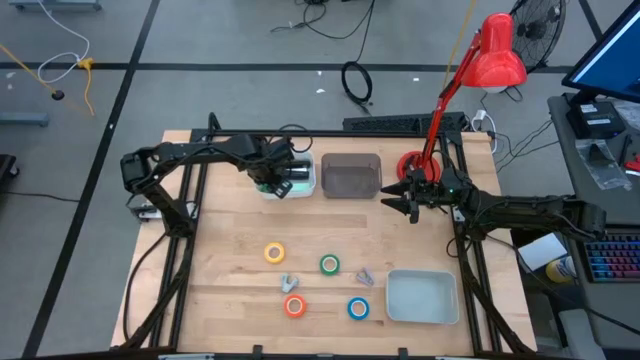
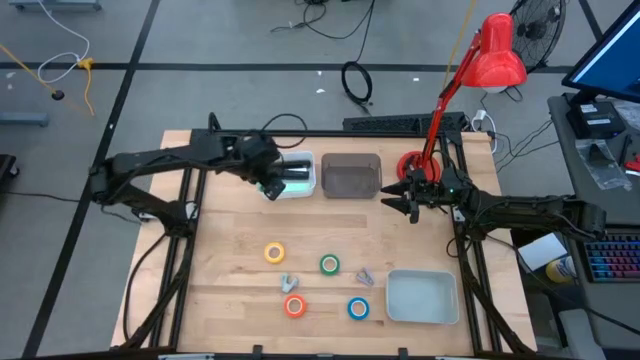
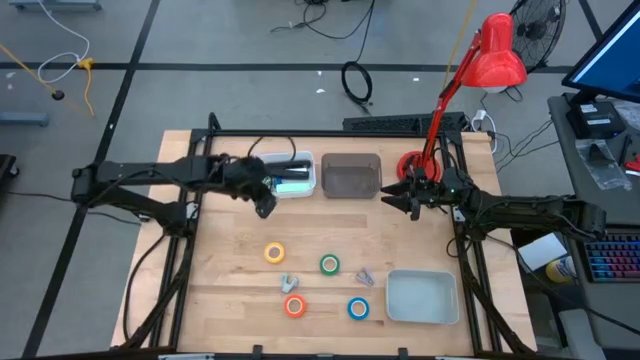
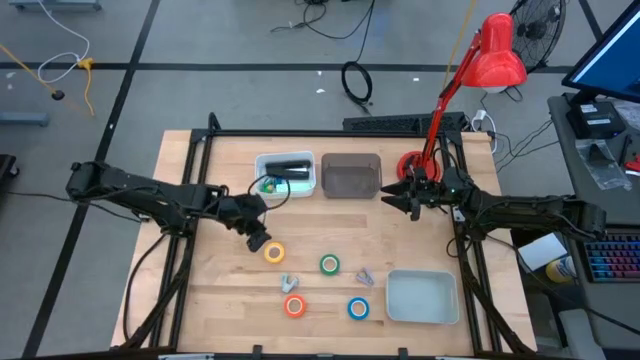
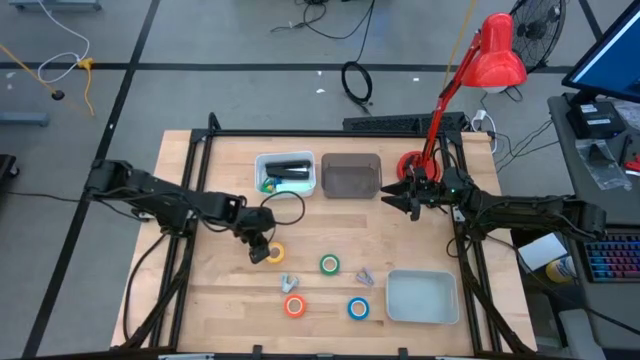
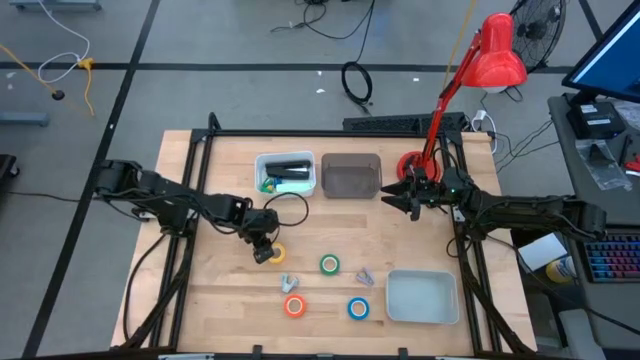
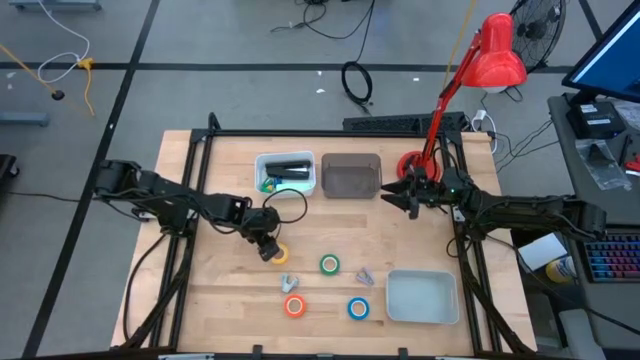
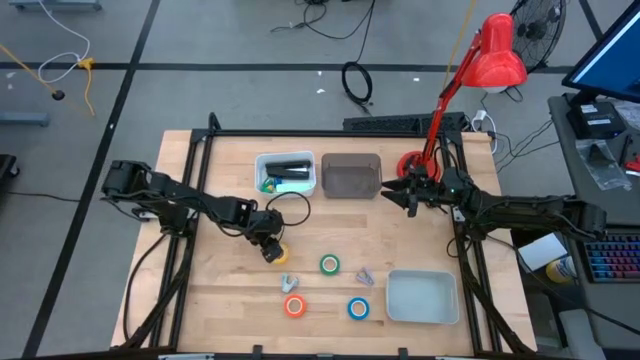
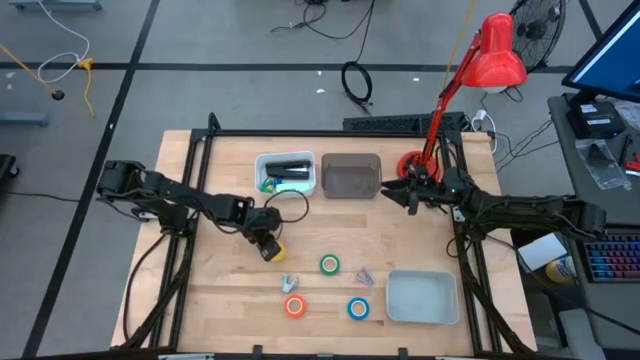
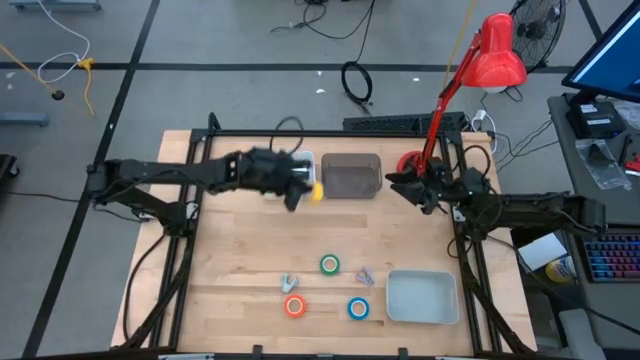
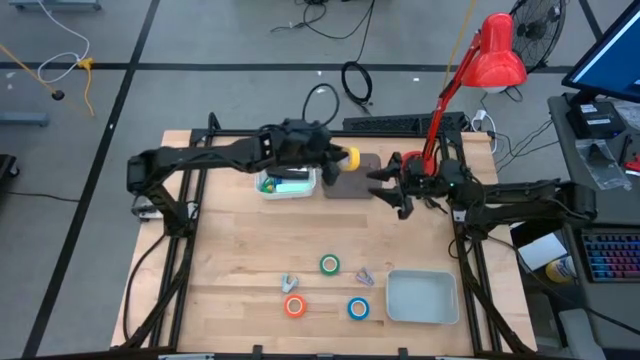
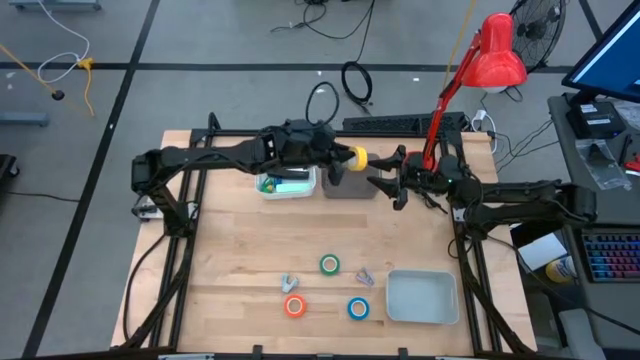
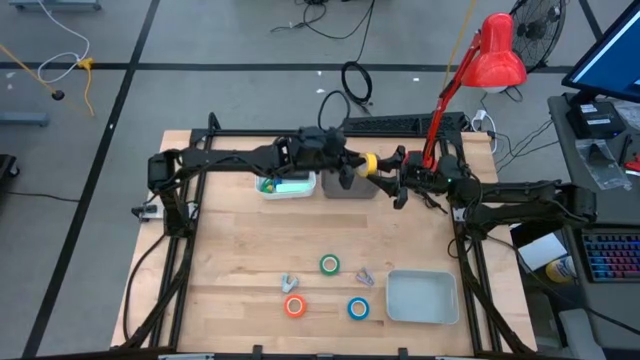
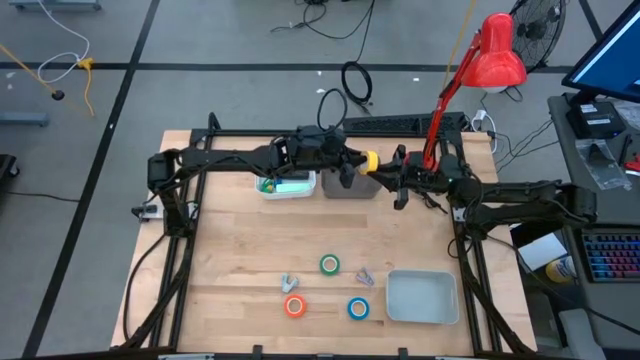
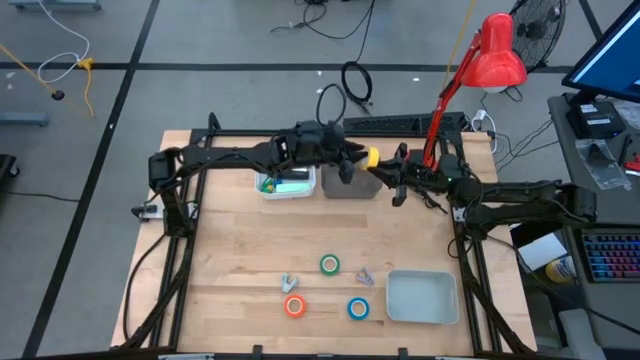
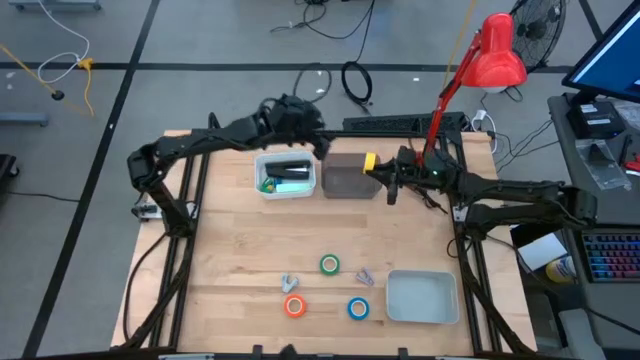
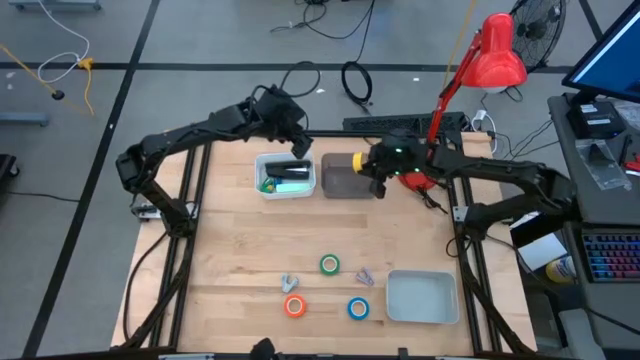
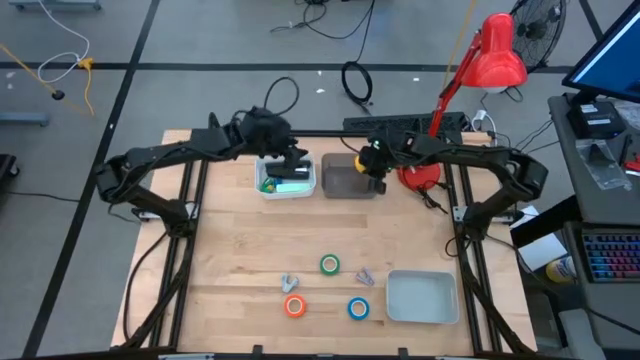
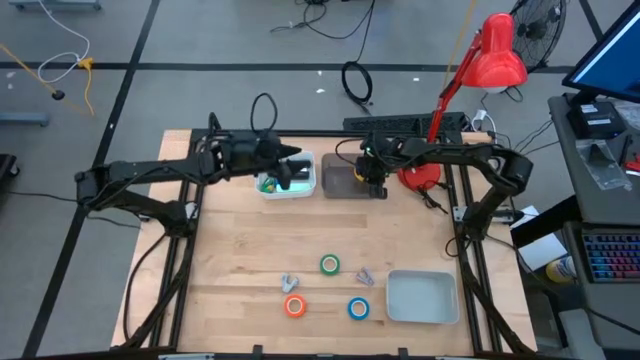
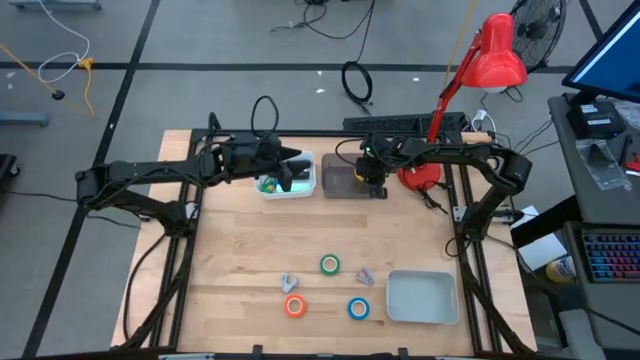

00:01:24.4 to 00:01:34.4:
Task: Pick and place Stapler, Stapler remover, tape
Put the yellow tape into the black bin

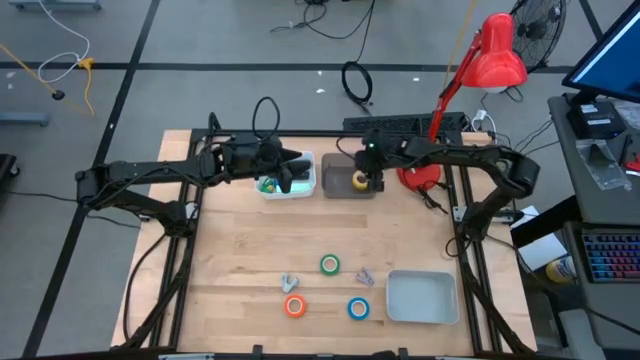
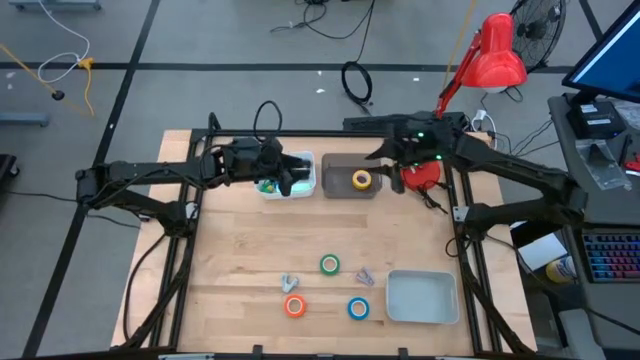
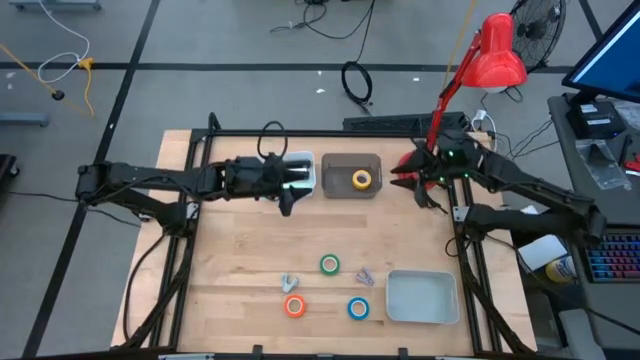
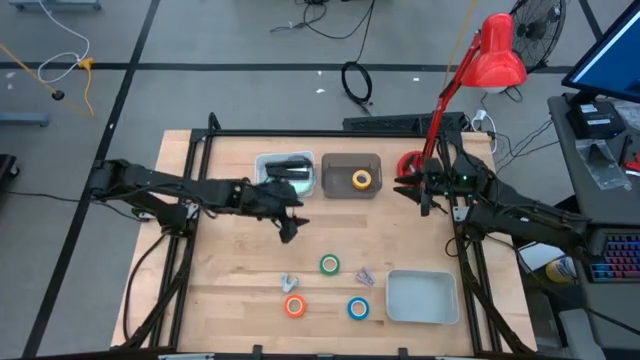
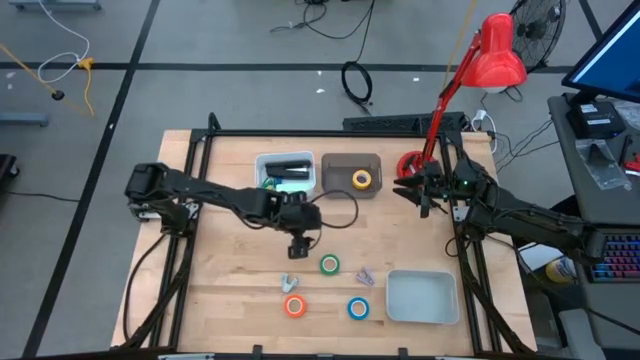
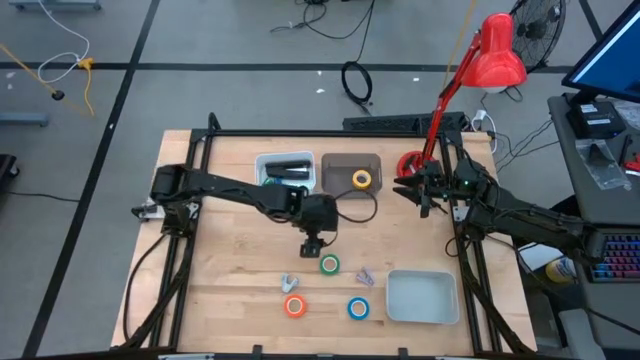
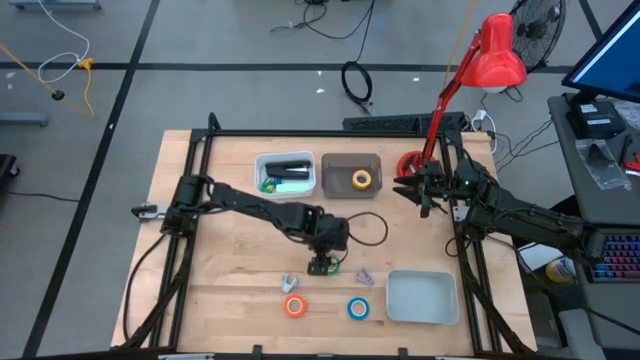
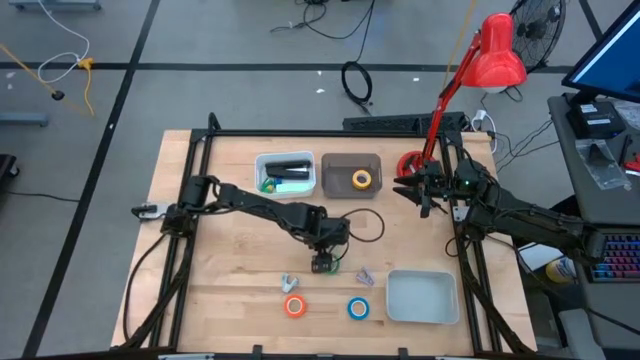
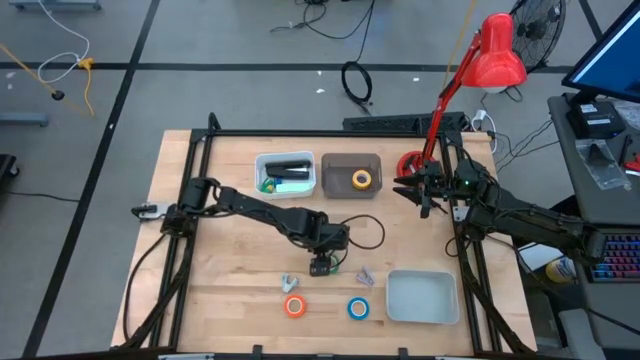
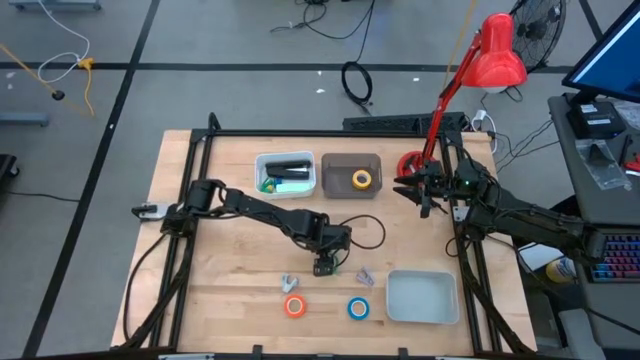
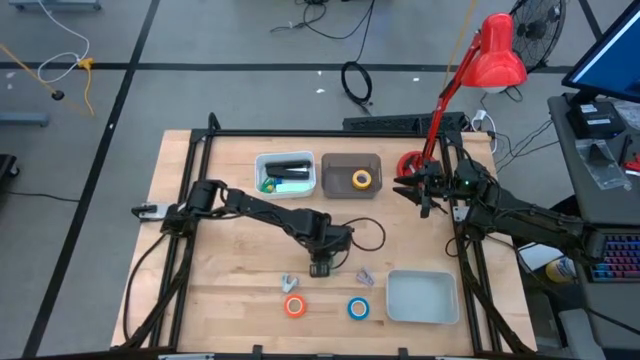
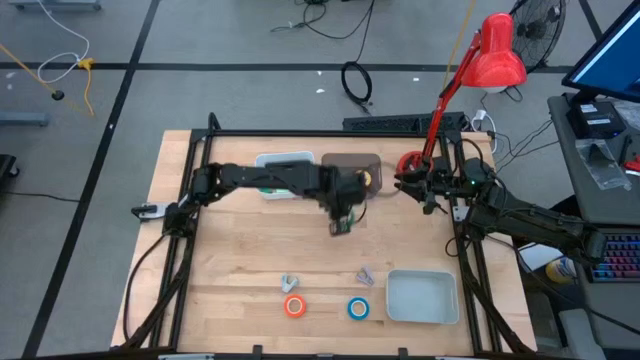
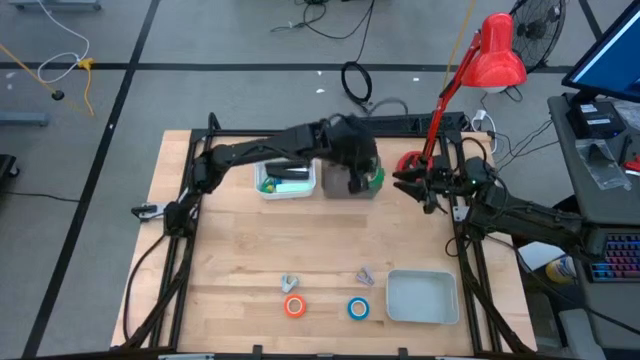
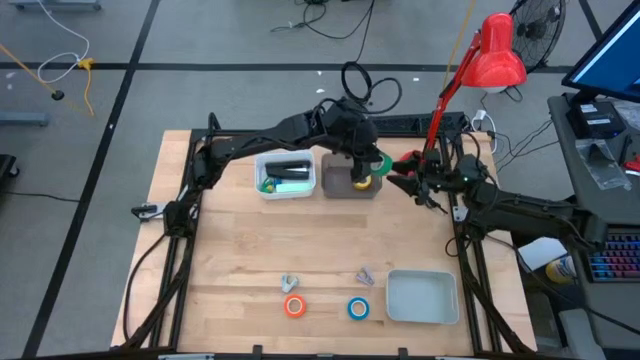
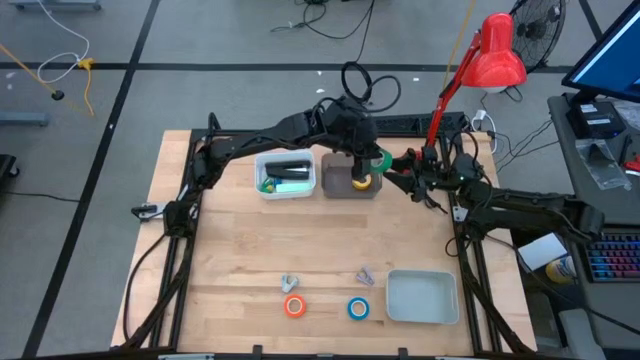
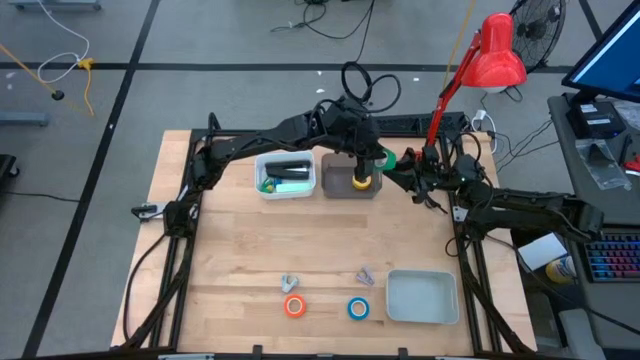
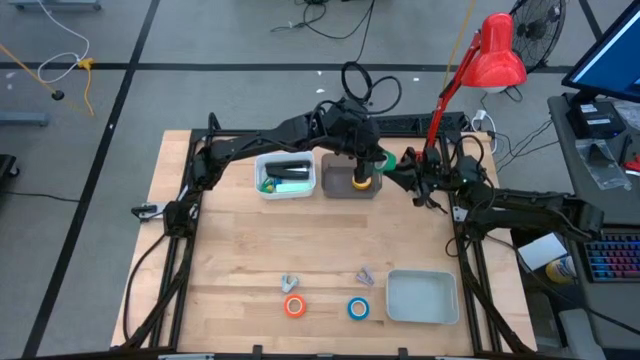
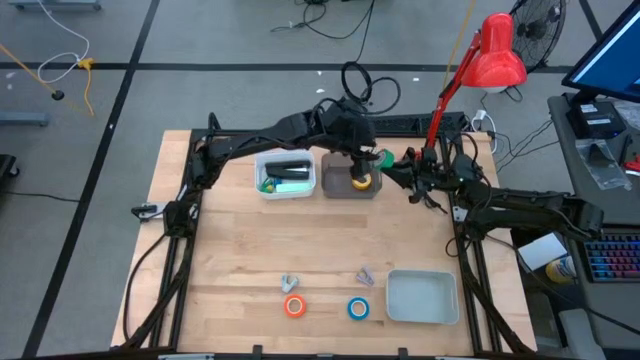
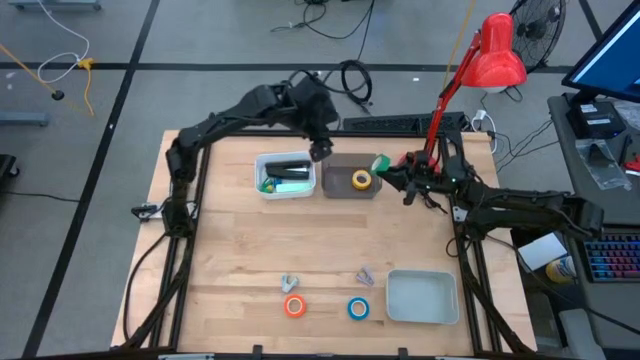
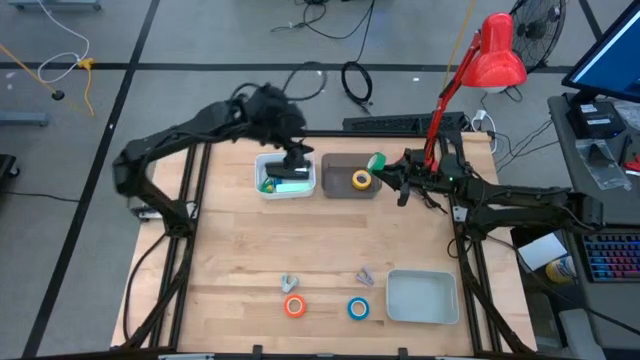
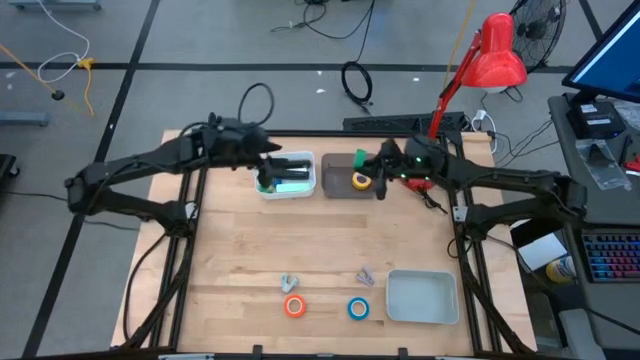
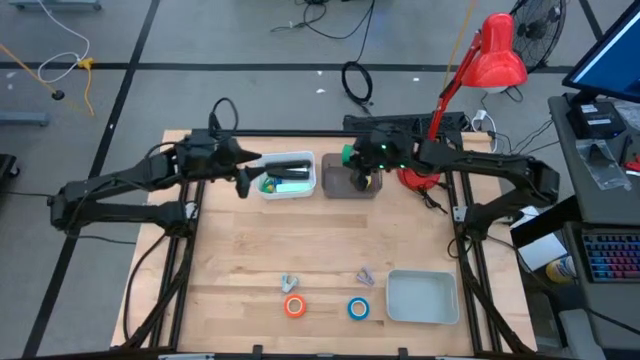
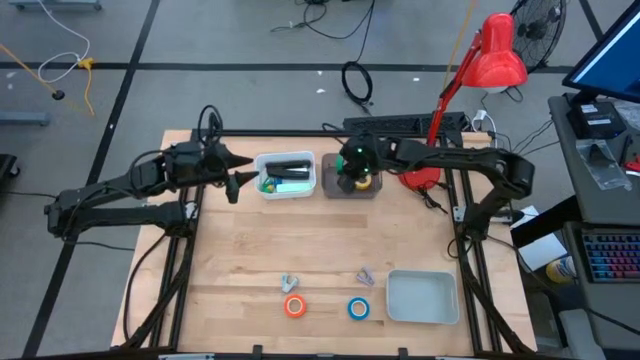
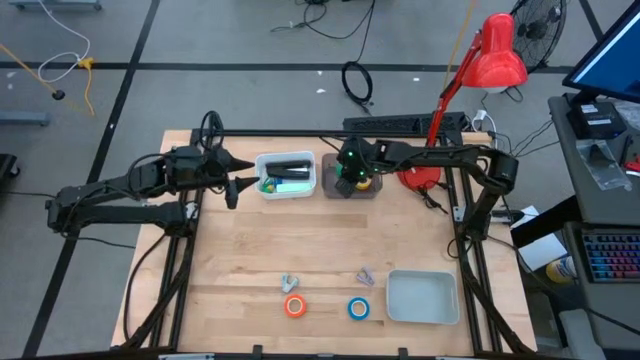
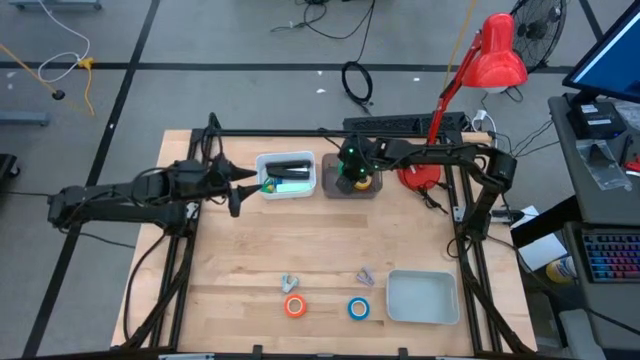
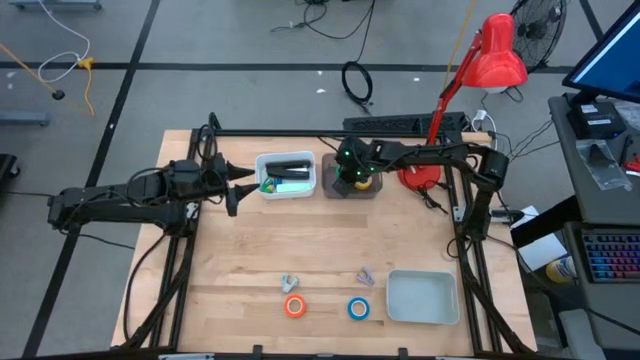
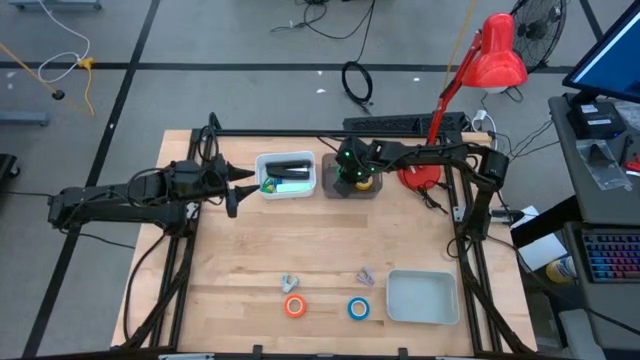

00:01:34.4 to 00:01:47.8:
Put the green tape into the black bin
